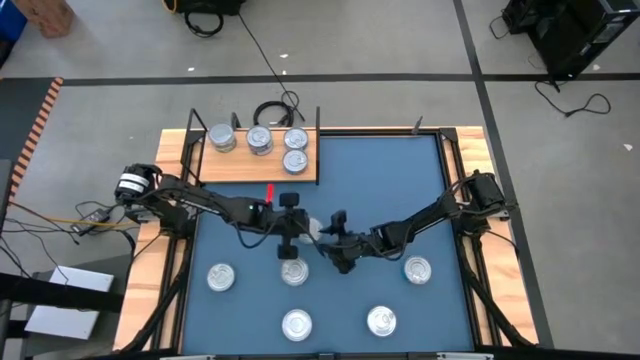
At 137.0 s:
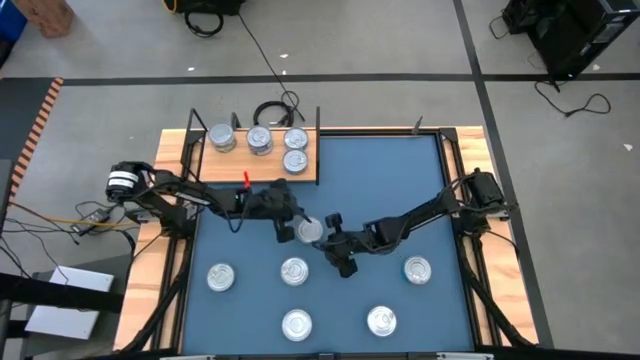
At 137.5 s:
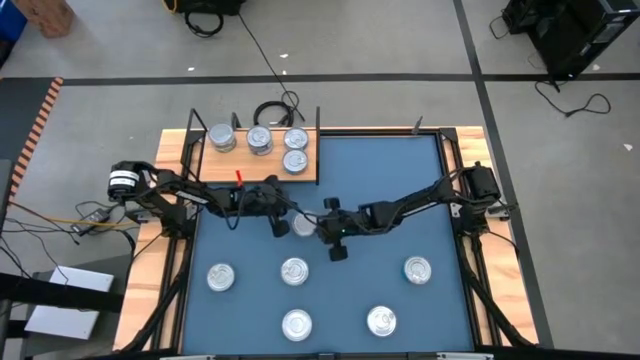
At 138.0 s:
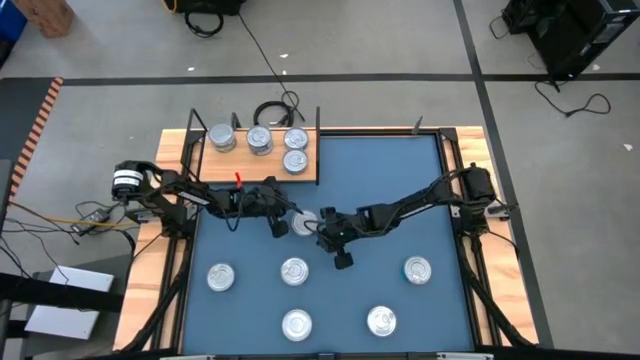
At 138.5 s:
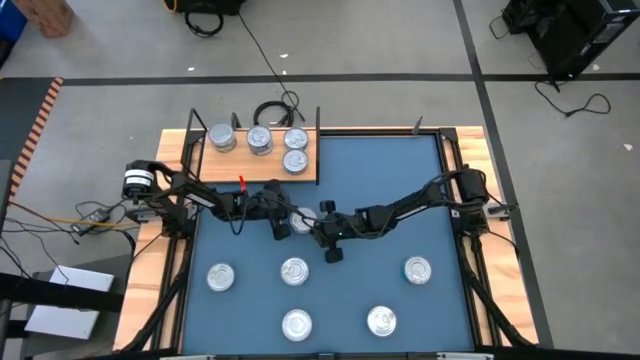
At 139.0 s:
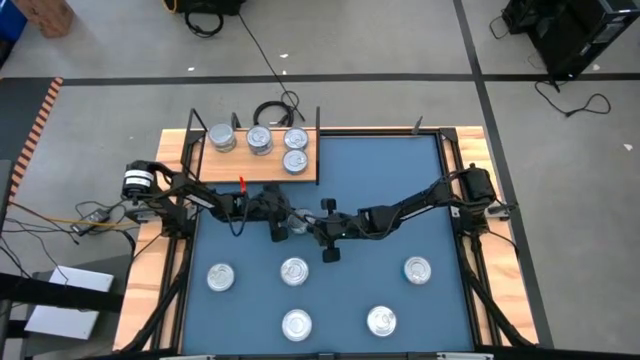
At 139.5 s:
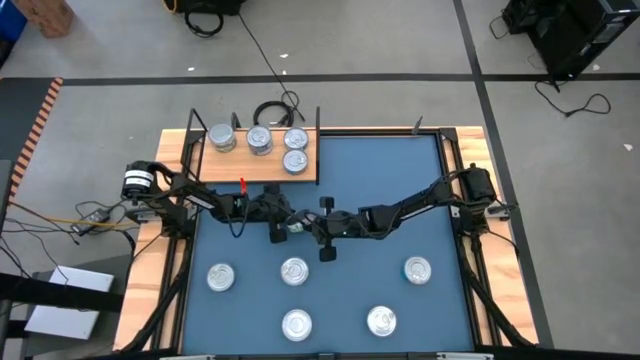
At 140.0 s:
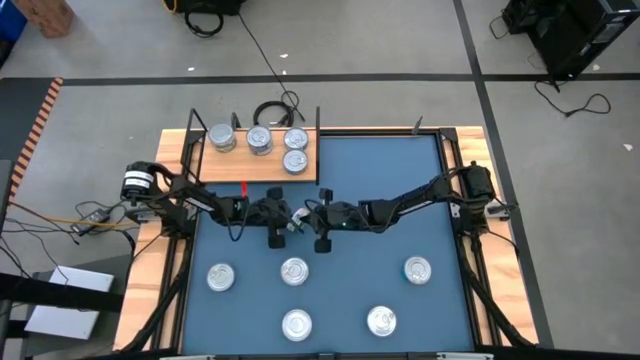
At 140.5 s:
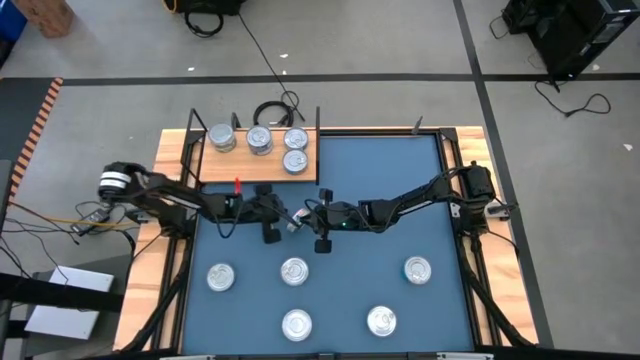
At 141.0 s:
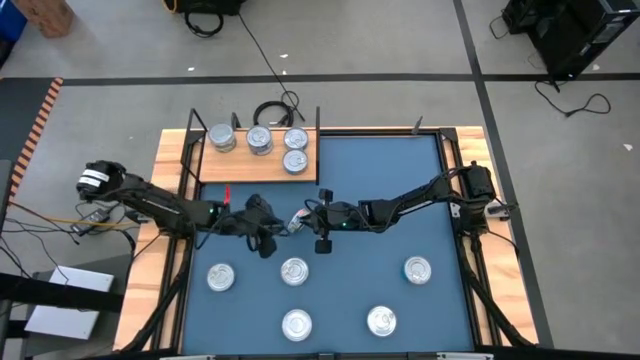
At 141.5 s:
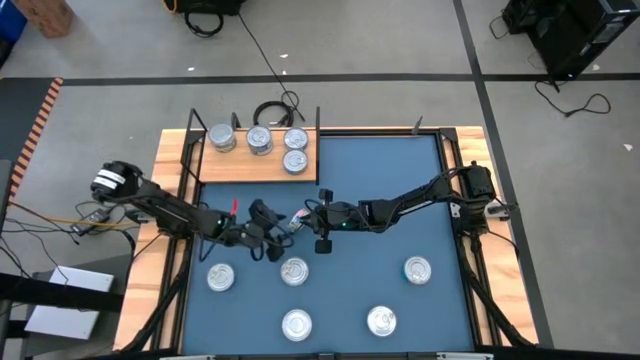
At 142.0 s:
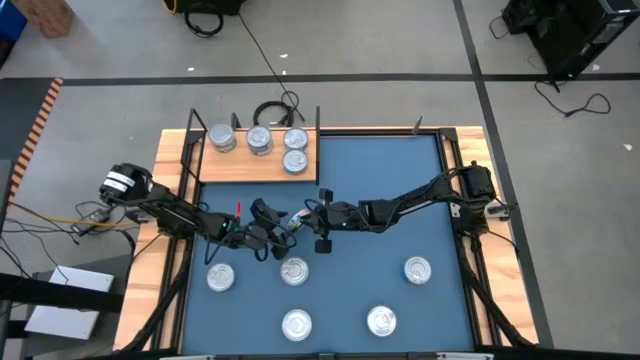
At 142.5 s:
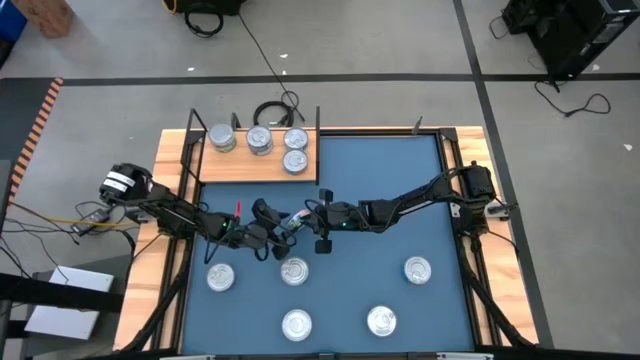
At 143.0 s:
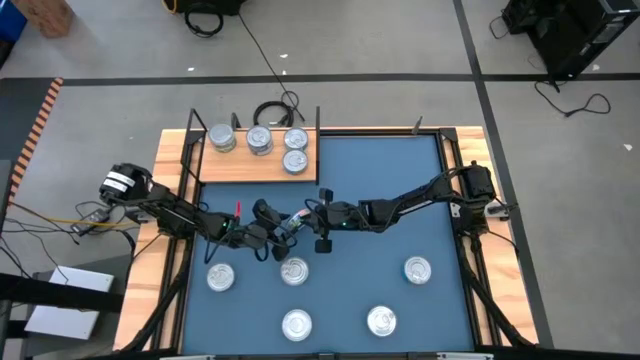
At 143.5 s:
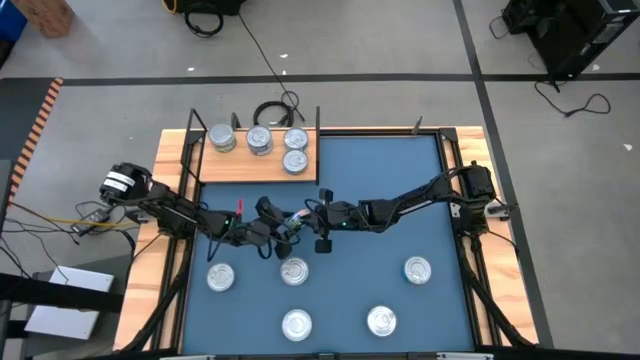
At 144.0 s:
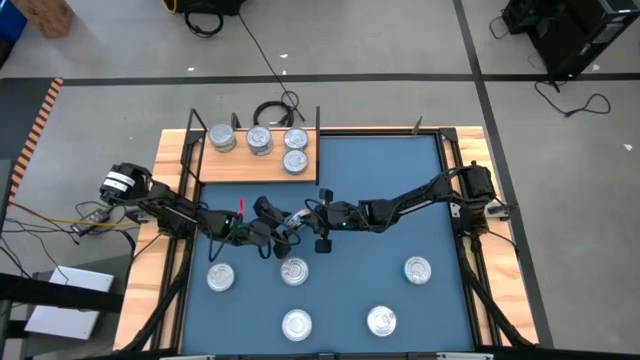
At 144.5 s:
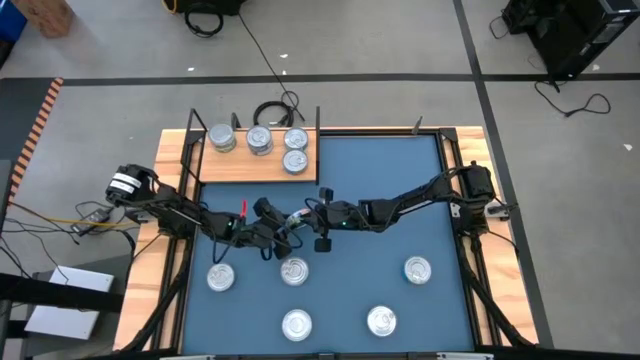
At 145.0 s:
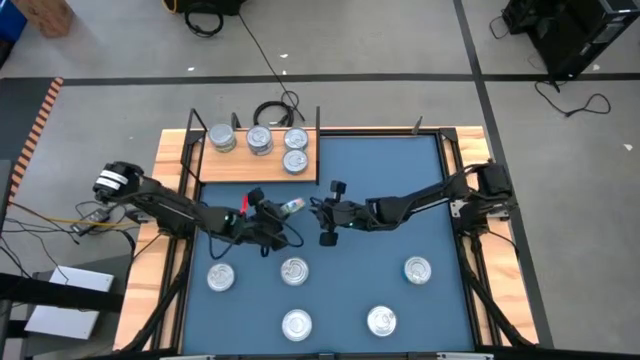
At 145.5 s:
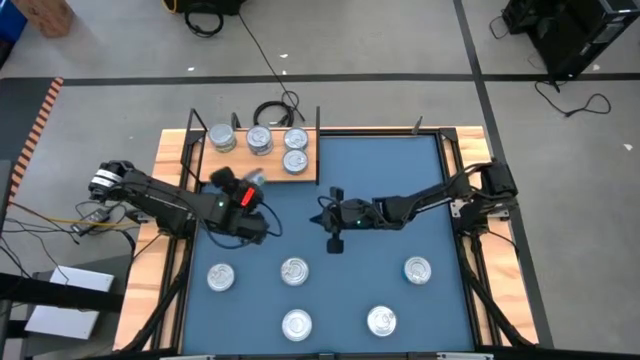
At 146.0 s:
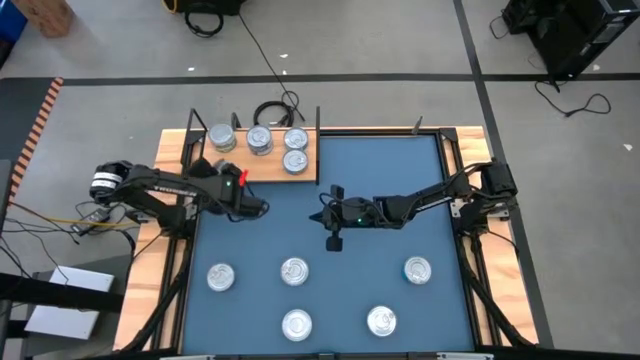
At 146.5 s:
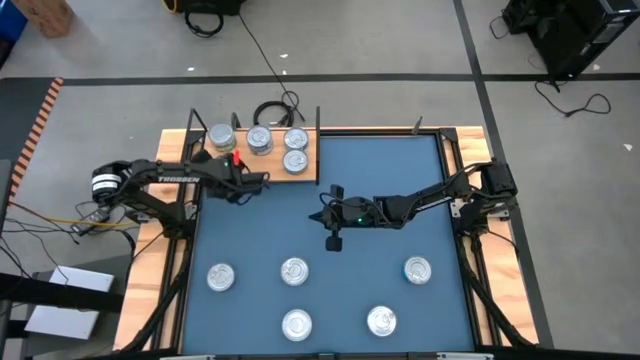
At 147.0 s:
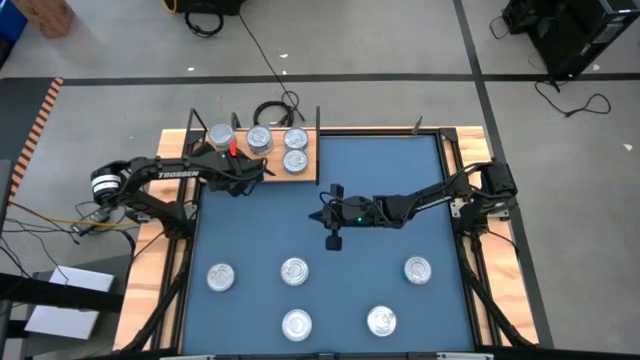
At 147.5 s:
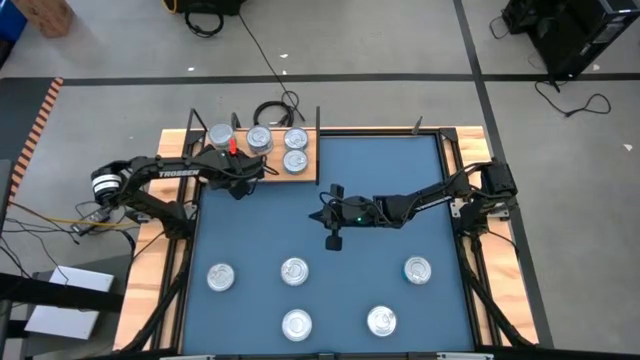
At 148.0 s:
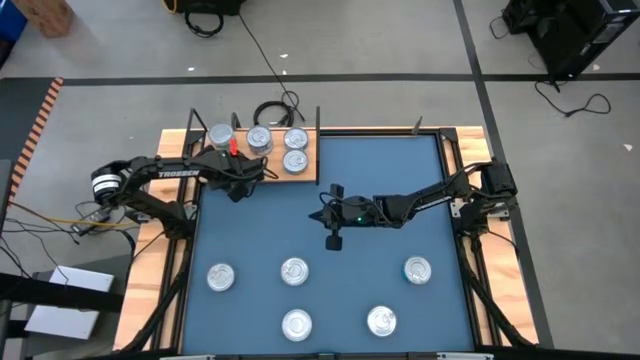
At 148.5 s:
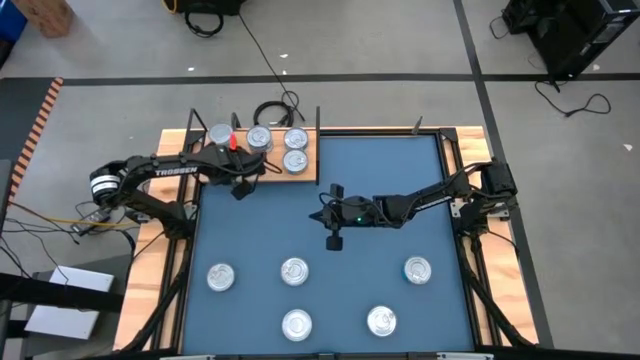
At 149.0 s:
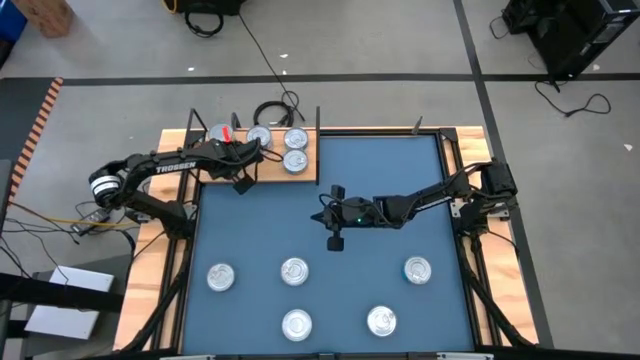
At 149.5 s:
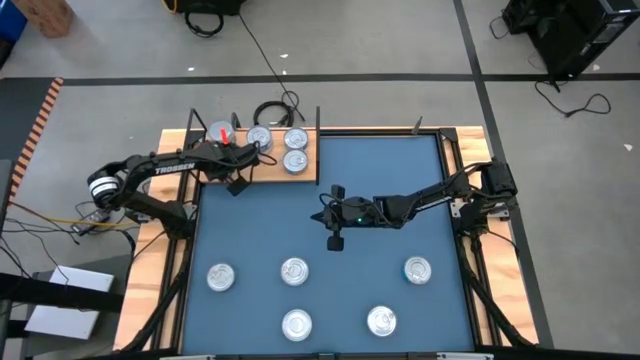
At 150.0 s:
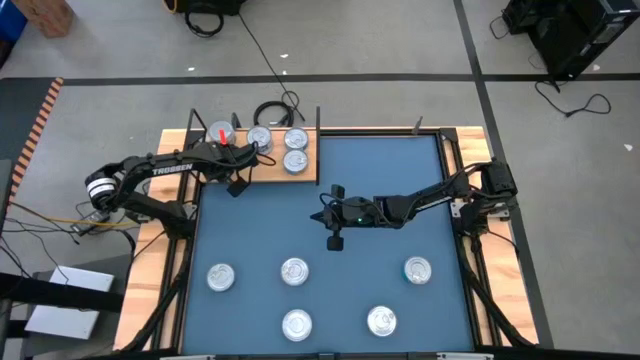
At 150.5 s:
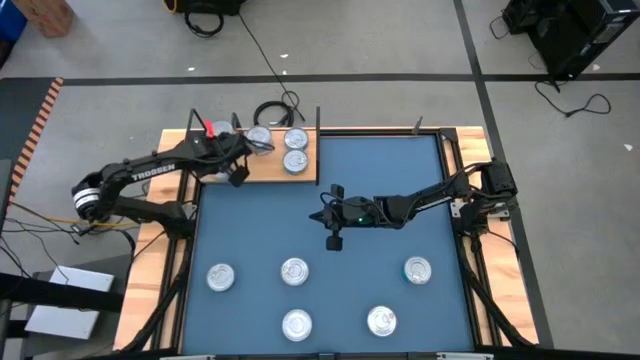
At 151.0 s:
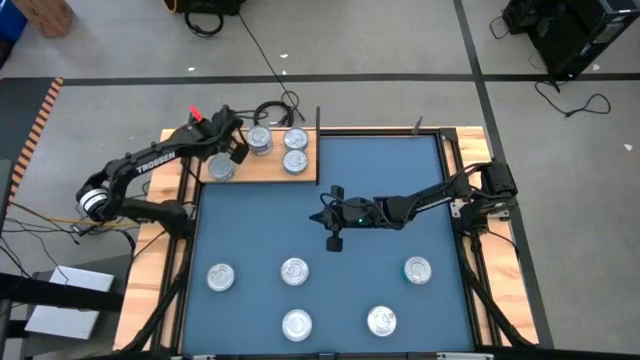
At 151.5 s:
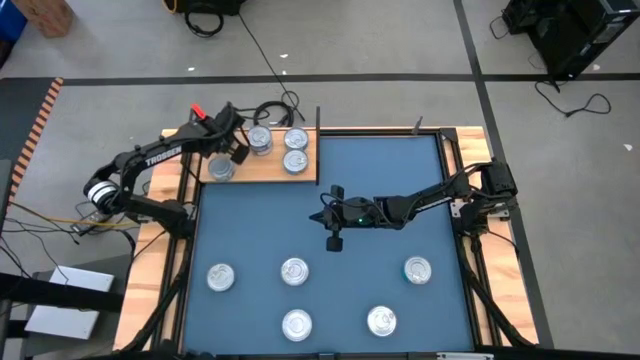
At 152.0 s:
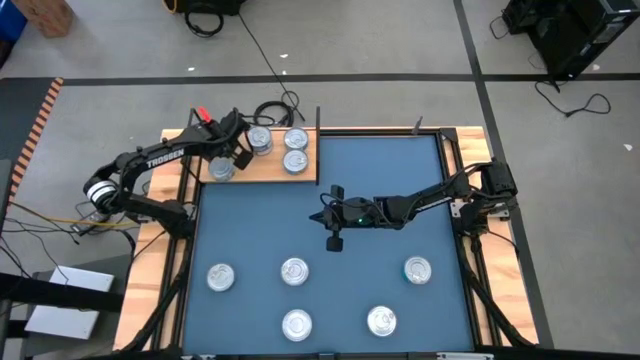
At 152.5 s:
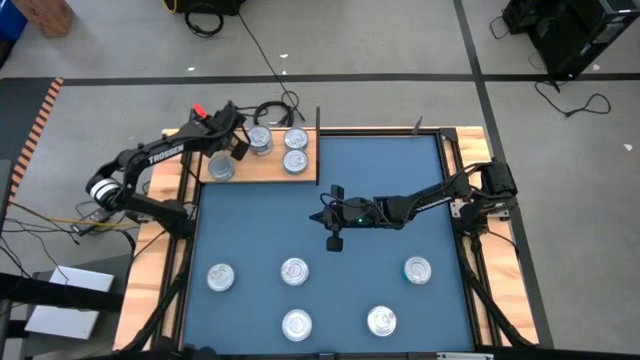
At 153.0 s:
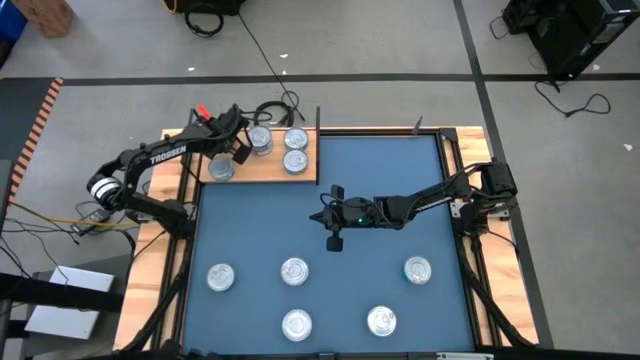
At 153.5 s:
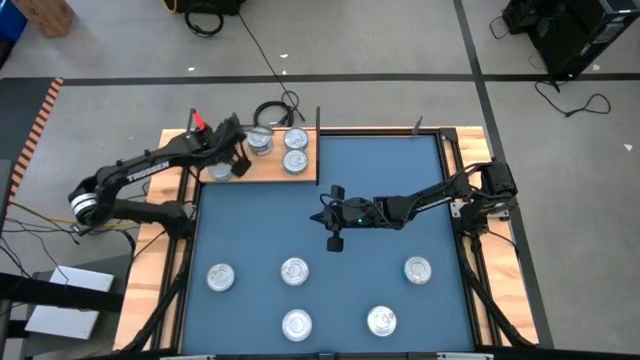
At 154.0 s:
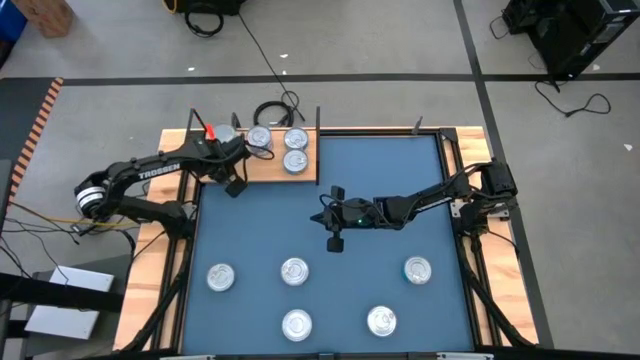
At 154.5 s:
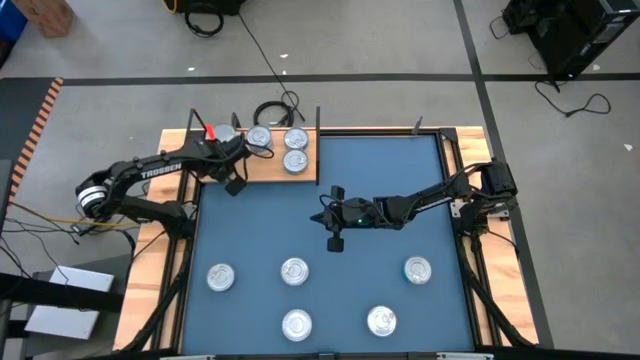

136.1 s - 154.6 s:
Task: Stack canned seafood by type on shelf
Put the green tuna can on the shelf aligned with the other green tuna can
